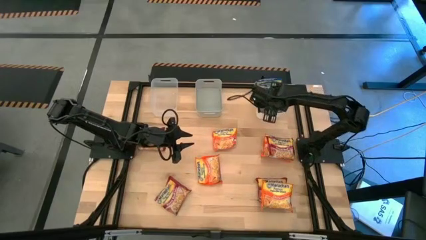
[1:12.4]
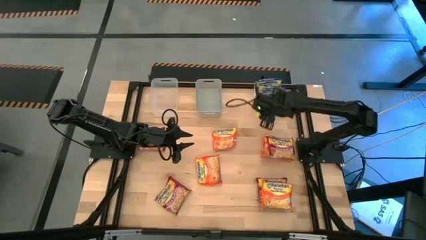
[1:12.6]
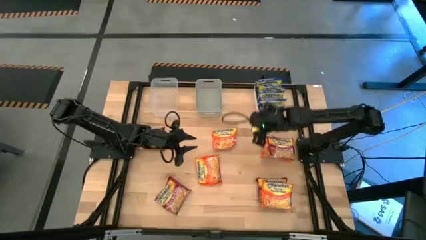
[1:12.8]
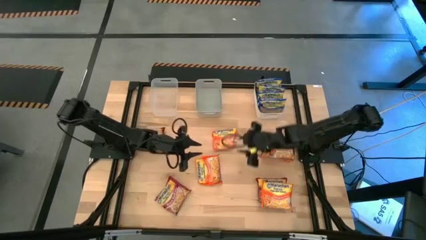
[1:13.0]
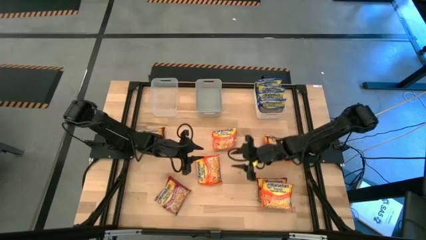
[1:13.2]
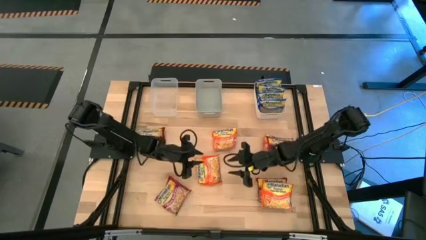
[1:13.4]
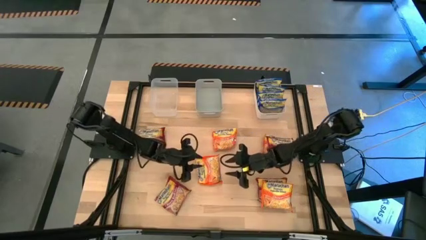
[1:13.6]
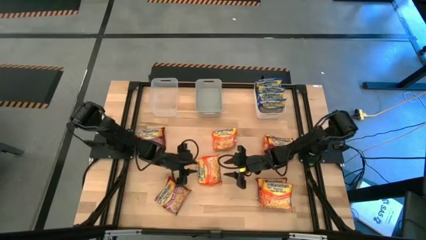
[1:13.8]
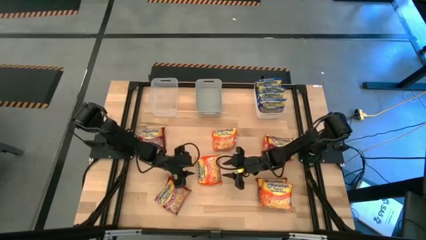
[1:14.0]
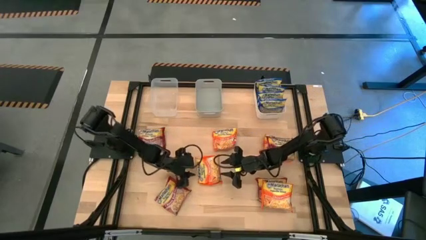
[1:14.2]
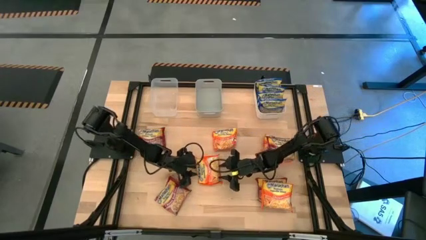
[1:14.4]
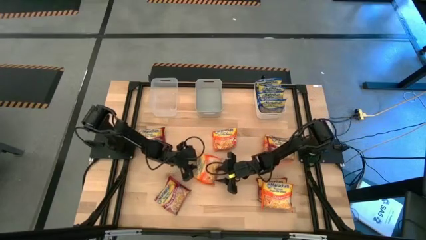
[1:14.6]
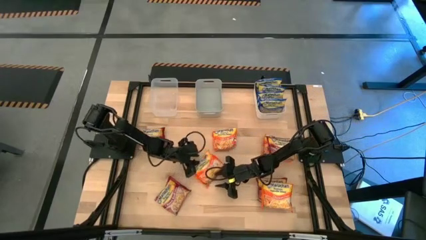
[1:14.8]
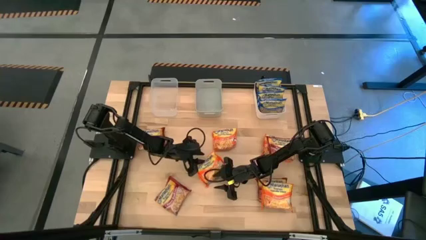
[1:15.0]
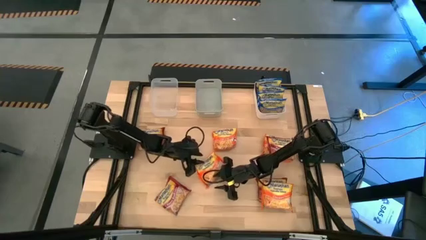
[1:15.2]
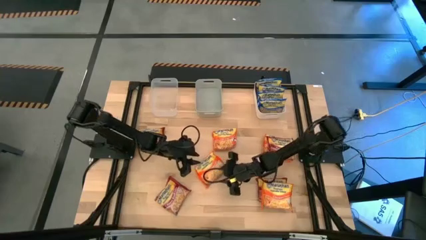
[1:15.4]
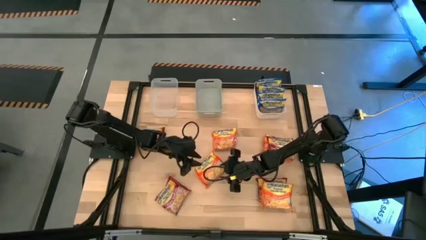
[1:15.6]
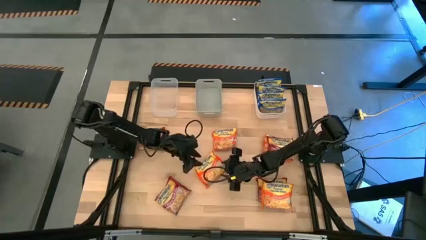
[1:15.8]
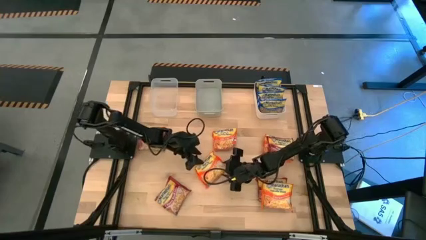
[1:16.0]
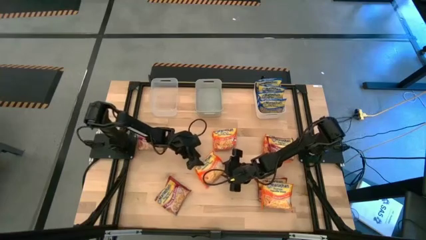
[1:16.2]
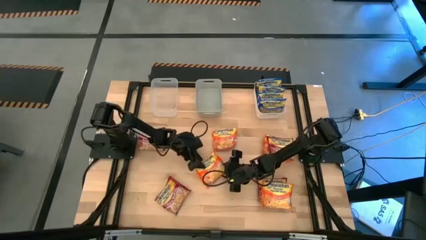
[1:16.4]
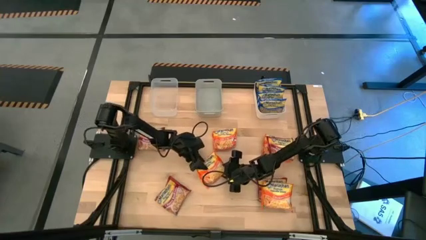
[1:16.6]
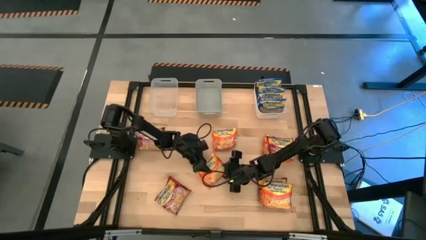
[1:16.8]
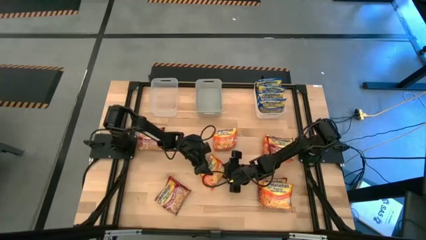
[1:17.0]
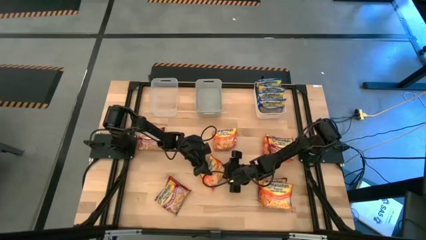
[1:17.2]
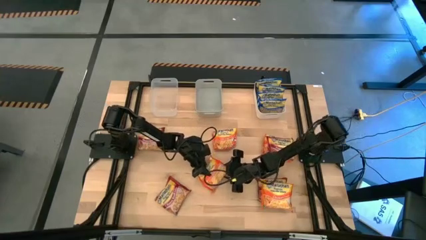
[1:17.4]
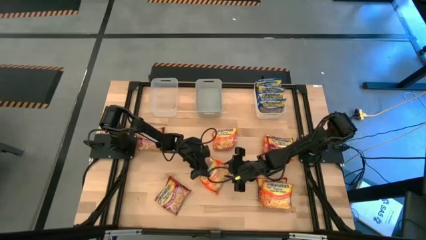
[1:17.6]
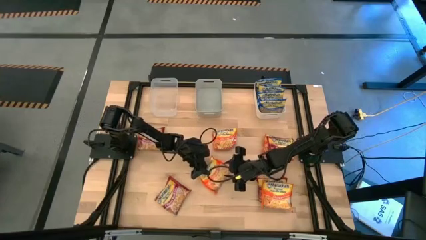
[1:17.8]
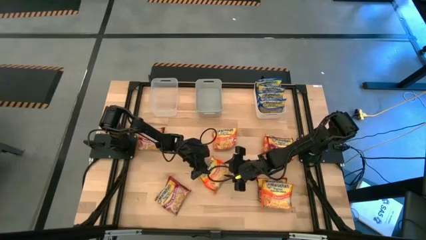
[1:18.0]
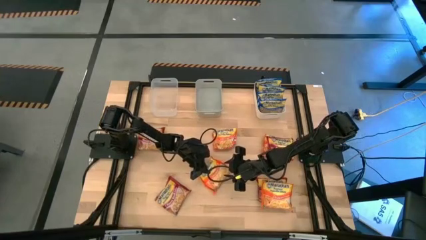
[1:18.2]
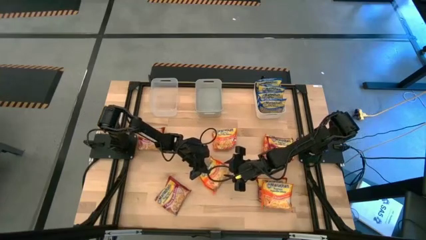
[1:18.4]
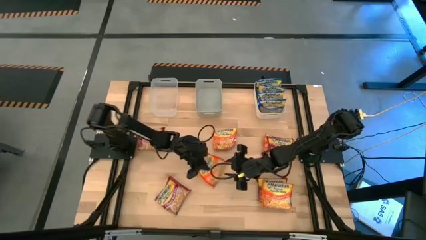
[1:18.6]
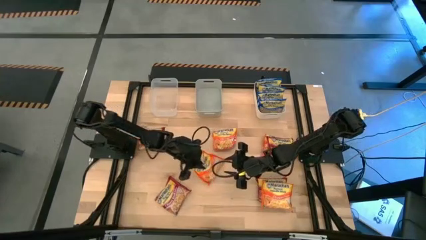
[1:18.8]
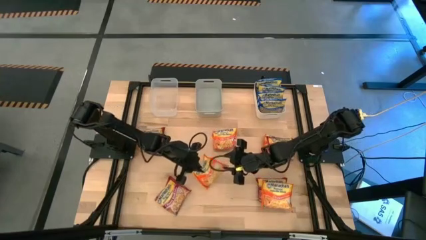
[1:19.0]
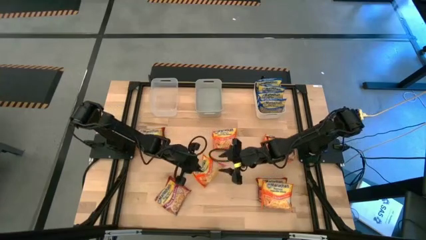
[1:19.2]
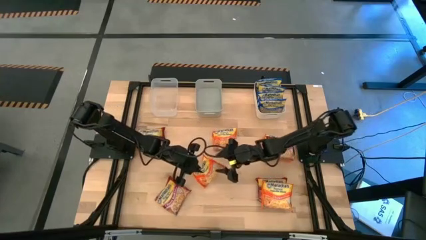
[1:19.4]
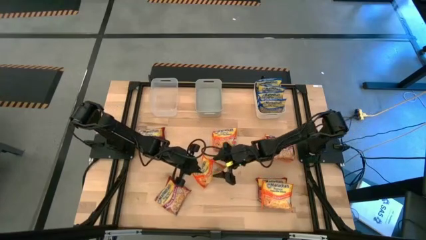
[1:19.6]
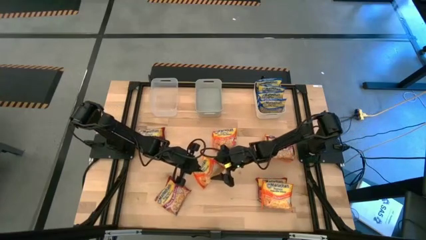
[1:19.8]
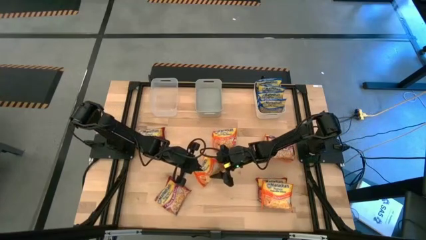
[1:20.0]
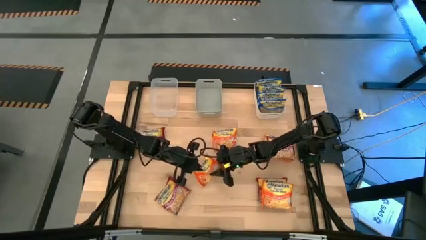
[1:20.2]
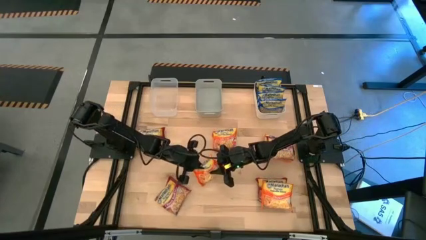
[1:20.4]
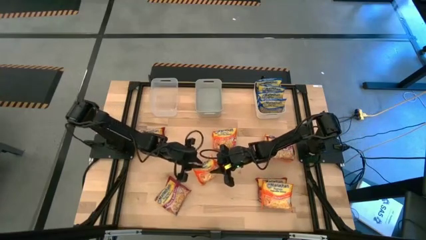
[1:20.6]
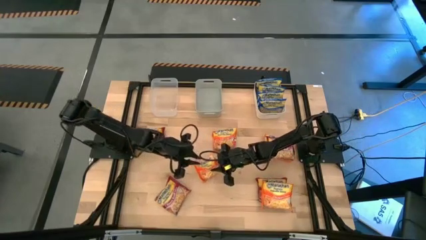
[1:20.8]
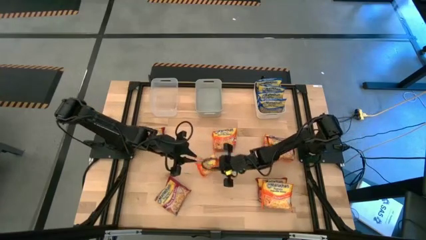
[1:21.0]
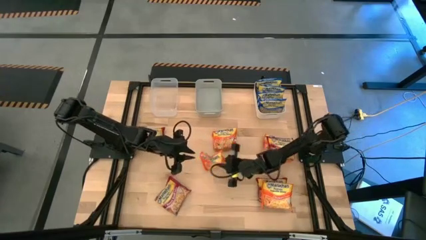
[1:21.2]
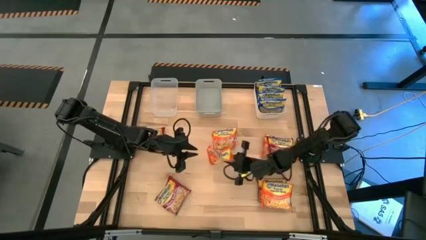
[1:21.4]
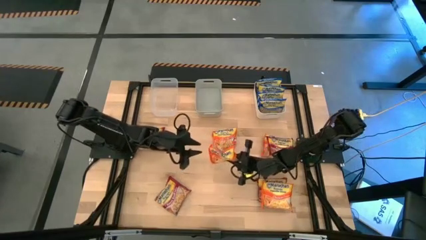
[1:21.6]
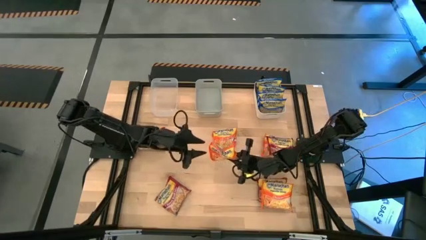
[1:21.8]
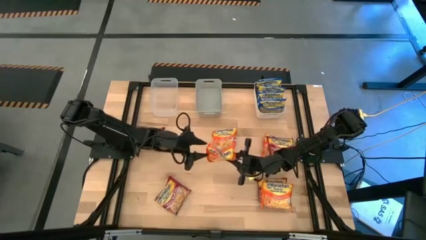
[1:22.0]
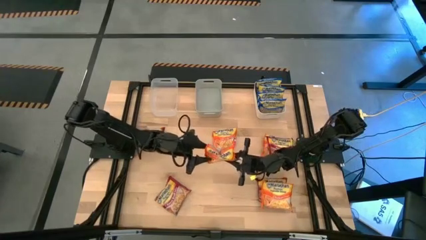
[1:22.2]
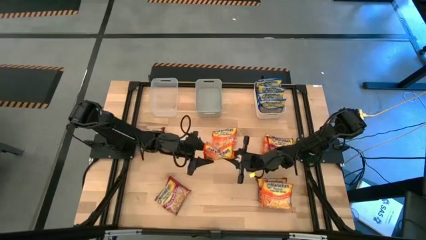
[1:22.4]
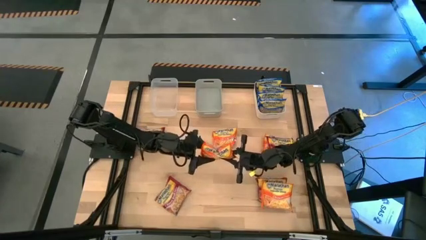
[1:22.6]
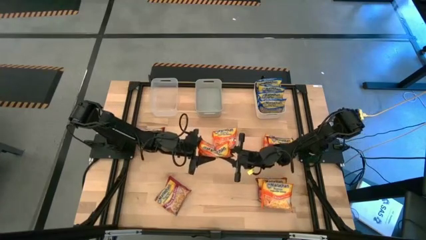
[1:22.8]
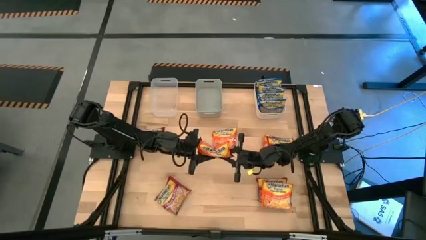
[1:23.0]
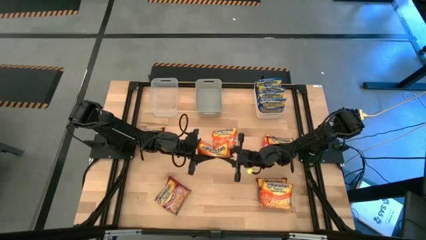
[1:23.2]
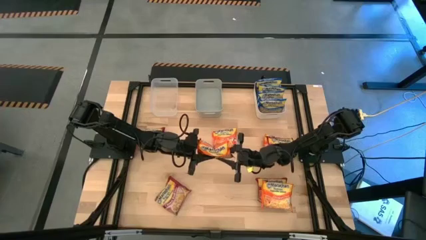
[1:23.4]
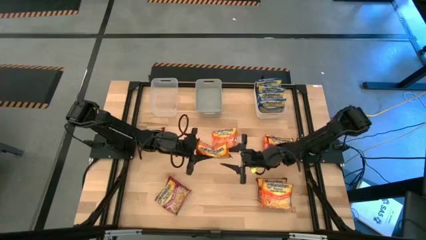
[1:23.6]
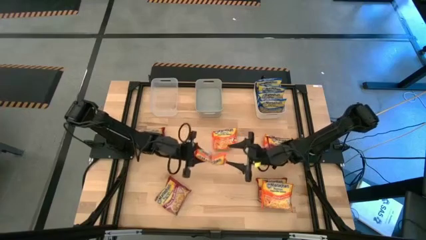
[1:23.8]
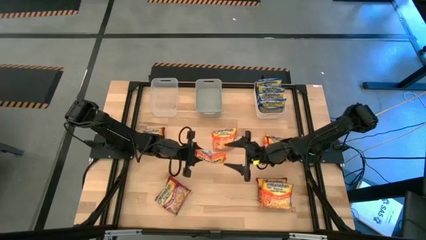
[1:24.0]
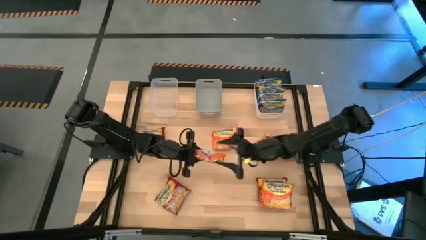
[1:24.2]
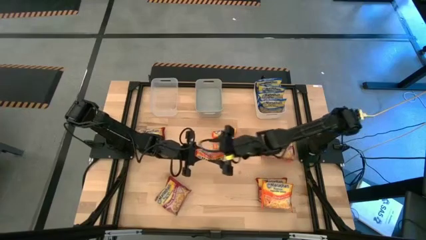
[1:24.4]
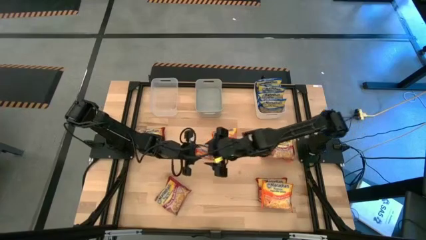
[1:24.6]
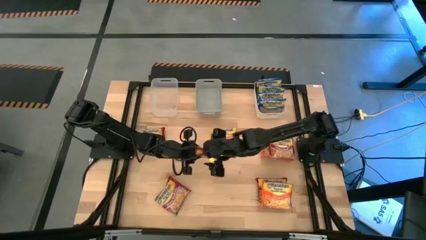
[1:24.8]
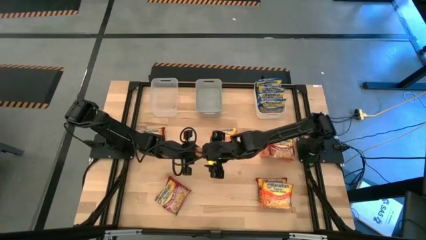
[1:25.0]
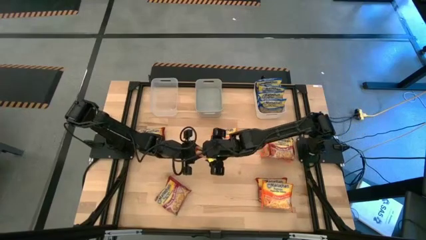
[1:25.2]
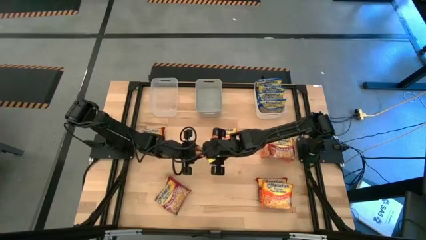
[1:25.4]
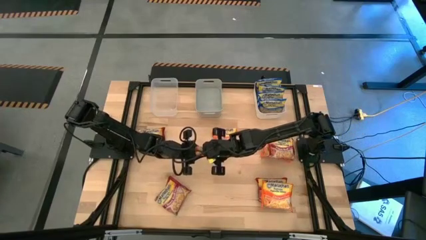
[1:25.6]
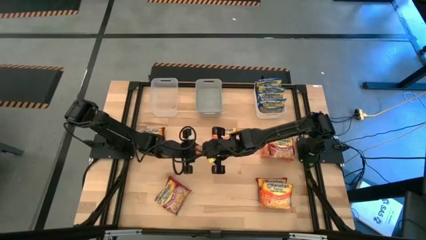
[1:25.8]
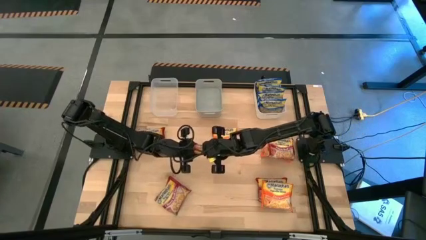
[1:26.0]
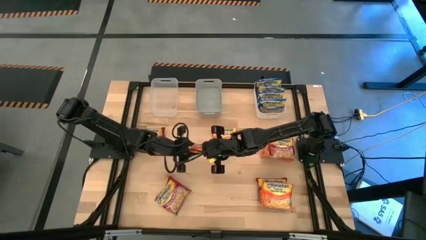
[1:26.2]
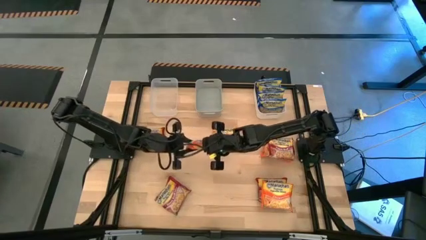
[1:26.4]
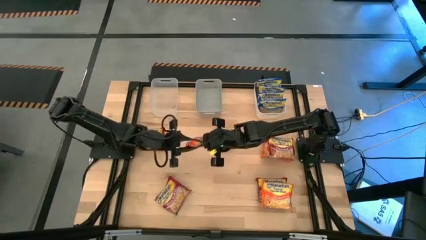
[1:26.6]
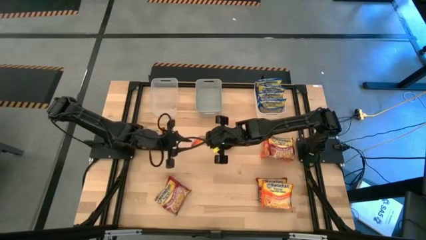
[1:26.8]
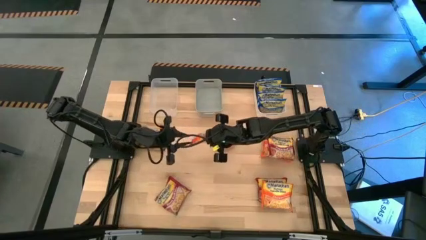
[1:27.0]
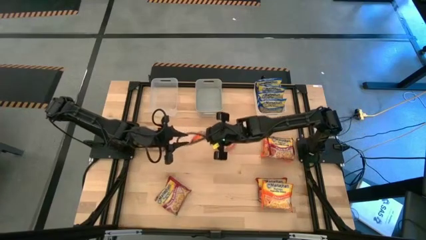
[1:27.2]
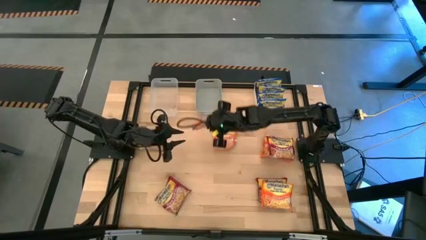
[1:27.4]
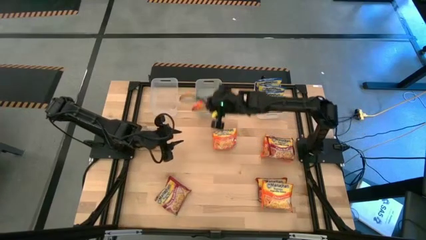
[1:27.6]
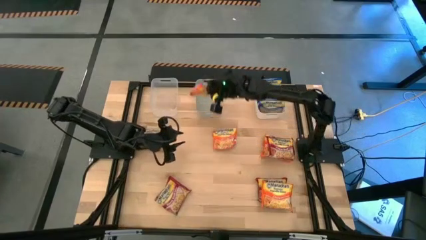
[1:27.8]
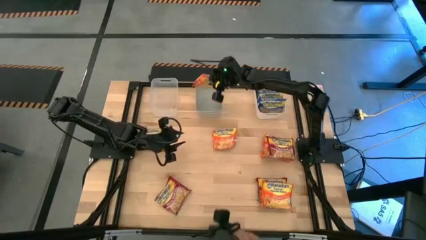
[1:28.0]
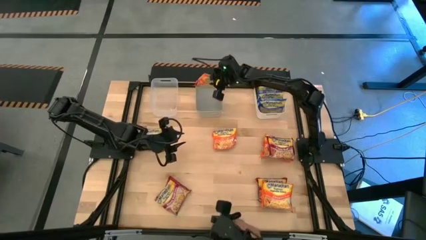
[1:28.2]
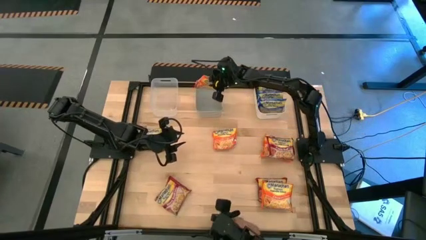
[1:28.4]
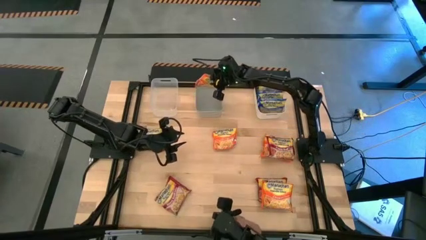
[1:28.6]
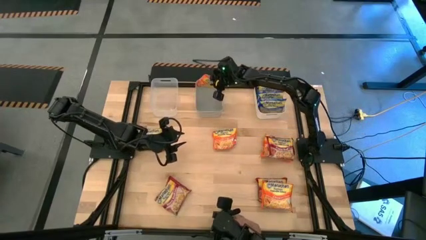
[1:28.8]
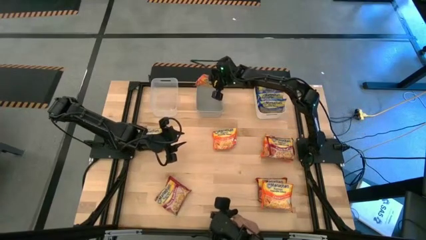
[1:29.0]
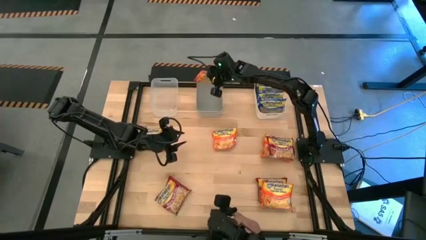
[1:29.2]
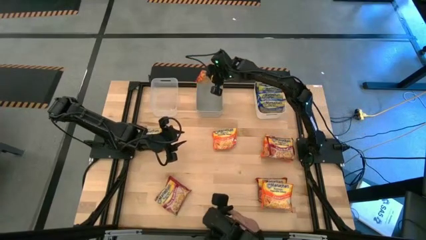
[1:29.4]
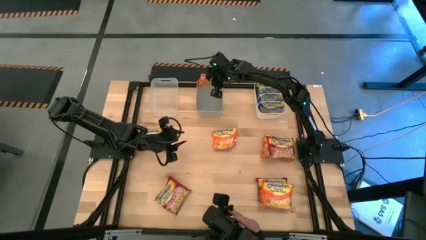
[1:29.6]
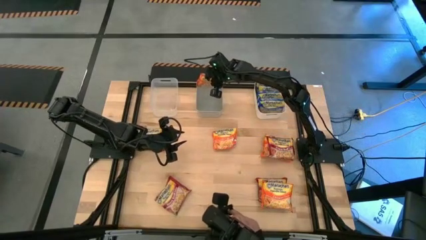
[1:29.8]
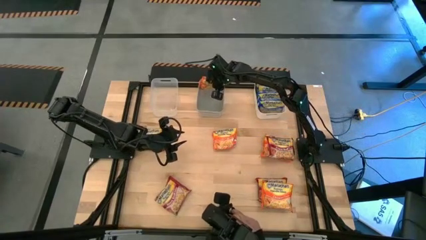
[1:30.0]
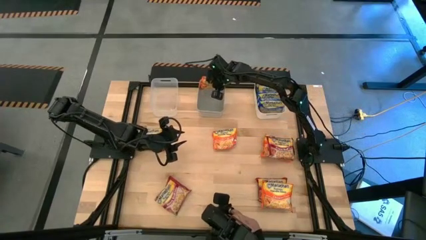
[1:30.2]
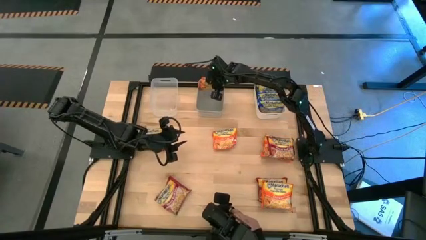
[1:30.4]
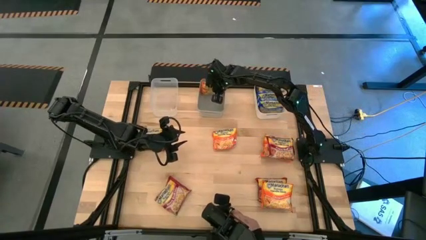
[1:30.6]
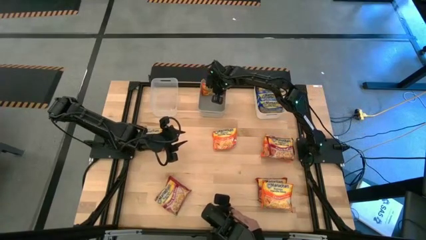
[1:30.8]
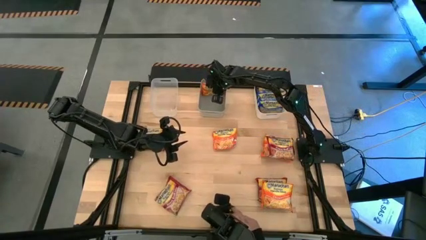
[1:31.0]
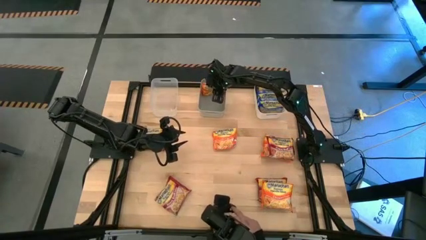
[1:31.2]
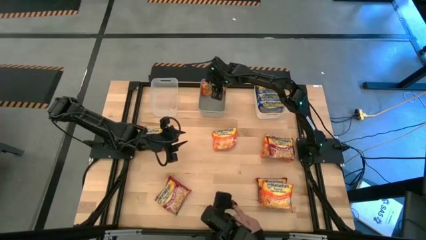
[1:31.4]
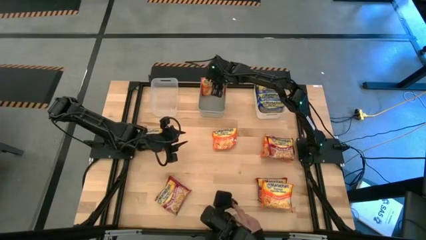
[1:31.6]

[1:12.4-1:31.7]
Task: Sort Maruchan noodles
Put the orange noodle pack into the gray bin
